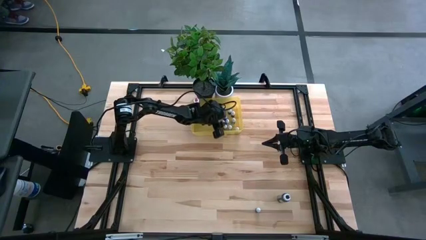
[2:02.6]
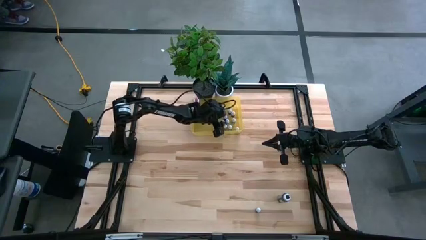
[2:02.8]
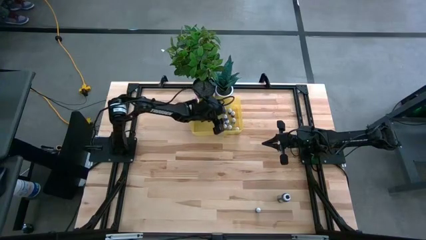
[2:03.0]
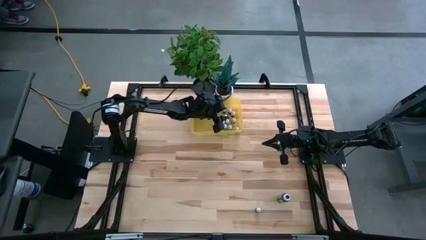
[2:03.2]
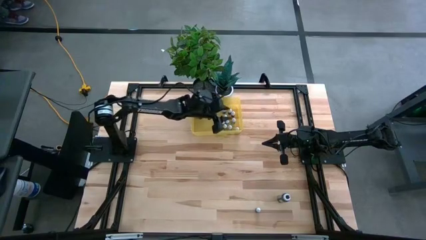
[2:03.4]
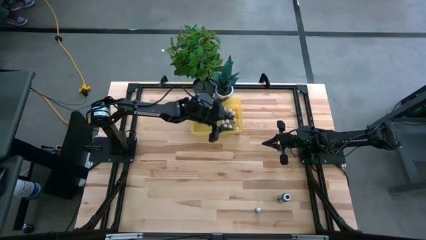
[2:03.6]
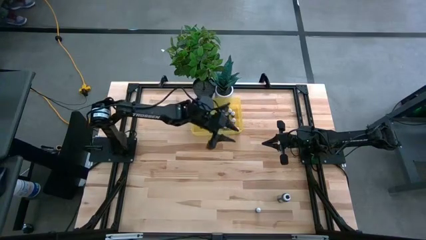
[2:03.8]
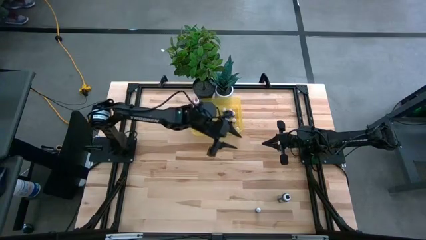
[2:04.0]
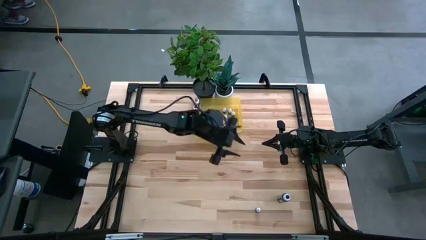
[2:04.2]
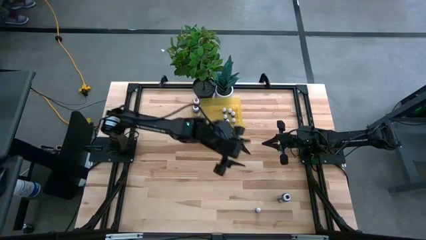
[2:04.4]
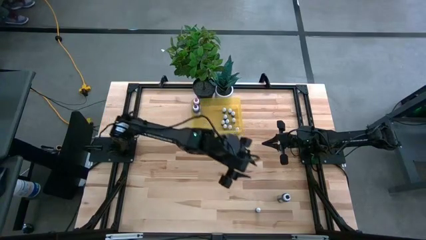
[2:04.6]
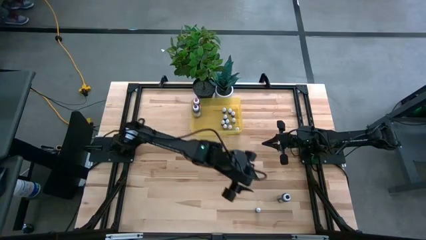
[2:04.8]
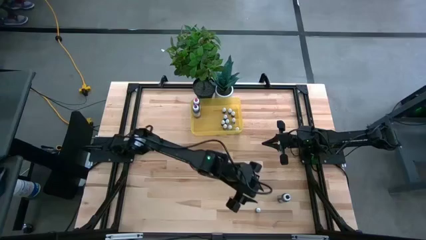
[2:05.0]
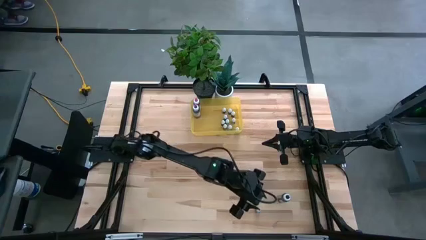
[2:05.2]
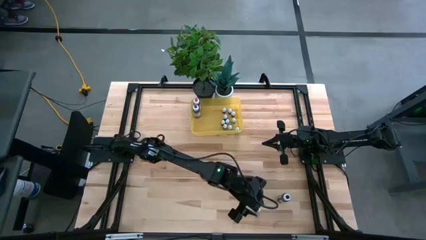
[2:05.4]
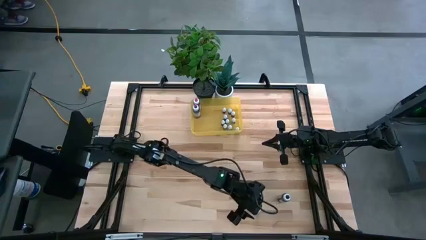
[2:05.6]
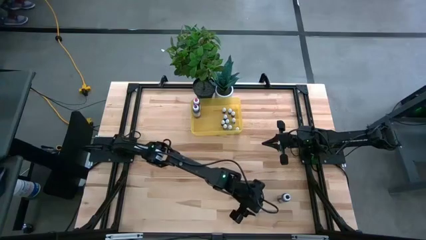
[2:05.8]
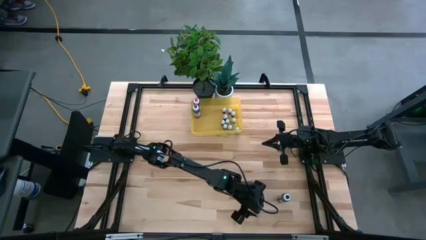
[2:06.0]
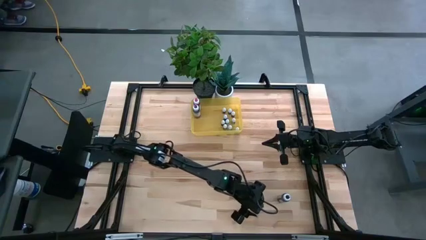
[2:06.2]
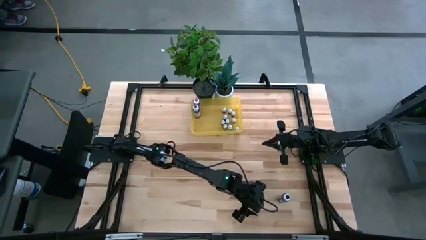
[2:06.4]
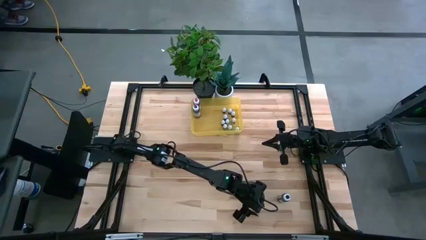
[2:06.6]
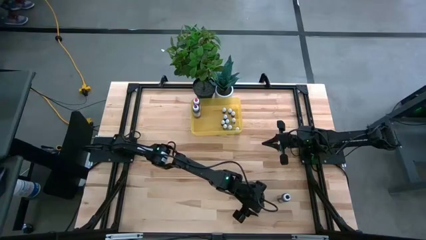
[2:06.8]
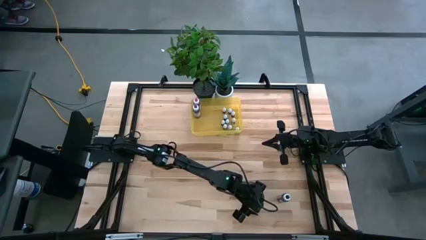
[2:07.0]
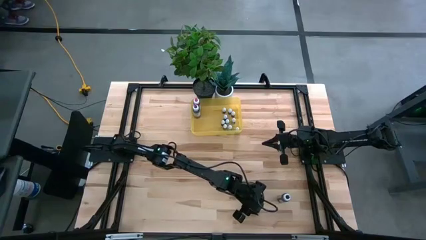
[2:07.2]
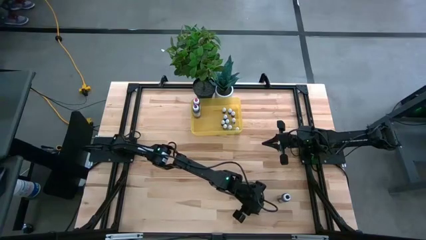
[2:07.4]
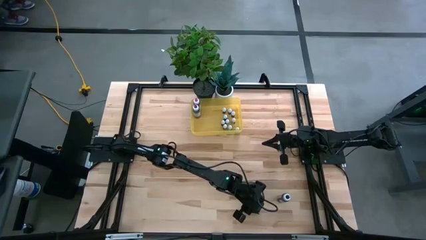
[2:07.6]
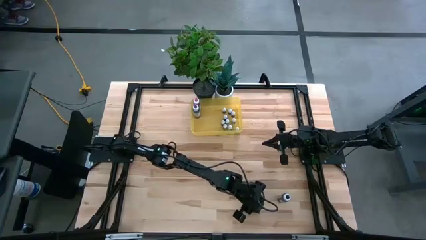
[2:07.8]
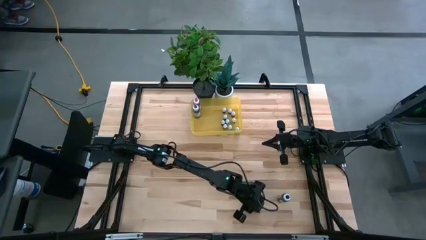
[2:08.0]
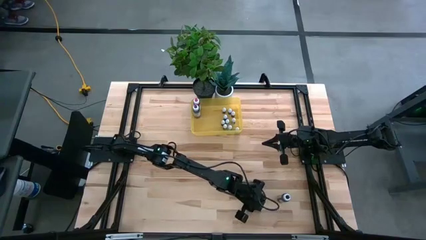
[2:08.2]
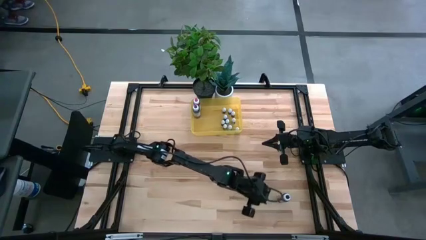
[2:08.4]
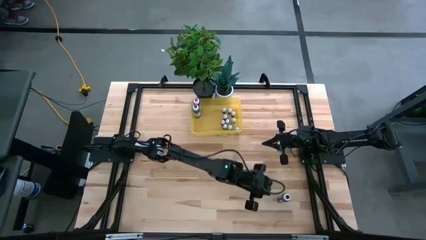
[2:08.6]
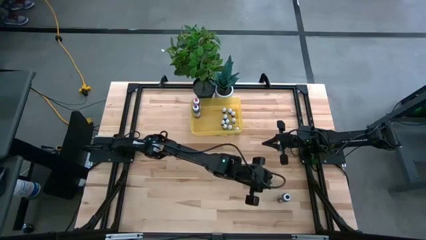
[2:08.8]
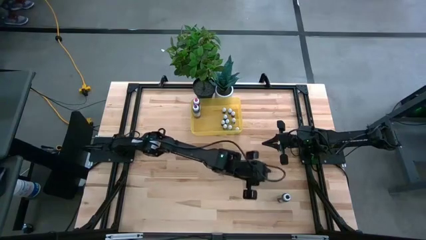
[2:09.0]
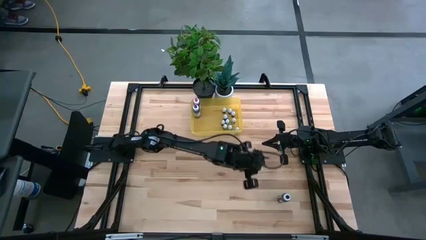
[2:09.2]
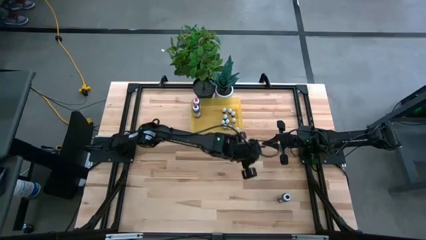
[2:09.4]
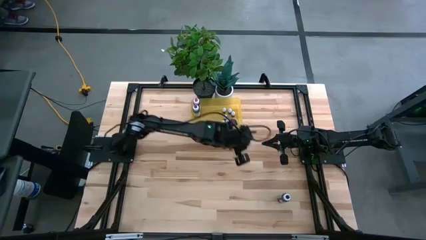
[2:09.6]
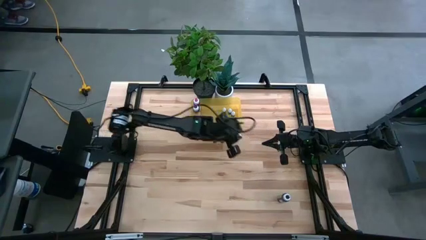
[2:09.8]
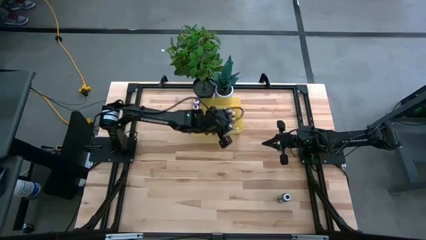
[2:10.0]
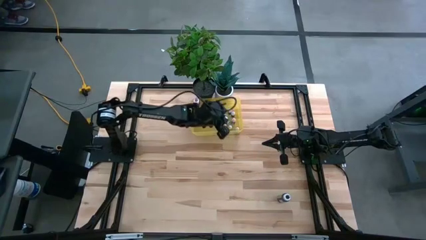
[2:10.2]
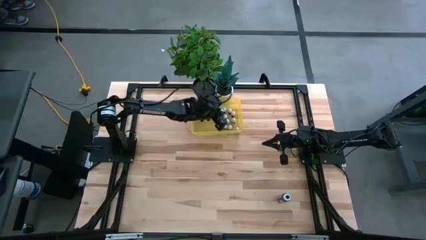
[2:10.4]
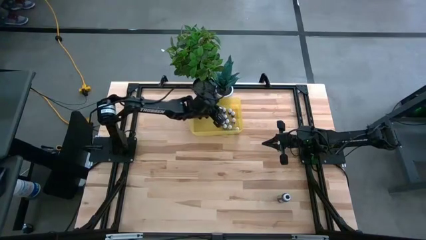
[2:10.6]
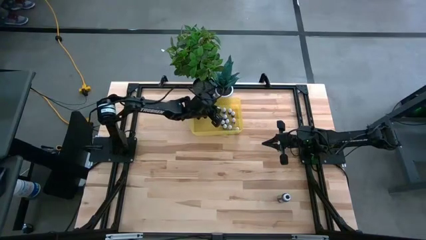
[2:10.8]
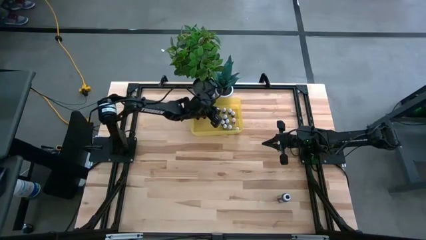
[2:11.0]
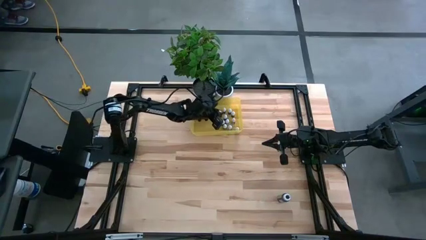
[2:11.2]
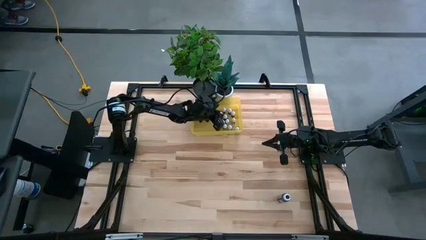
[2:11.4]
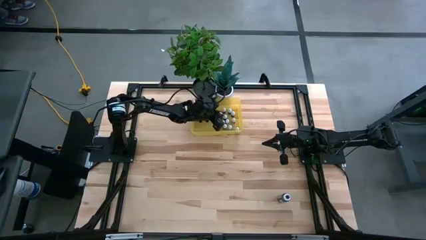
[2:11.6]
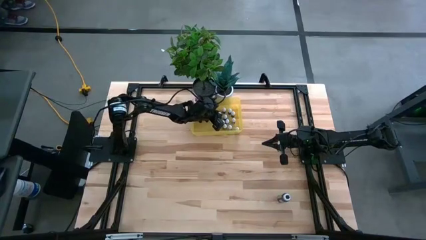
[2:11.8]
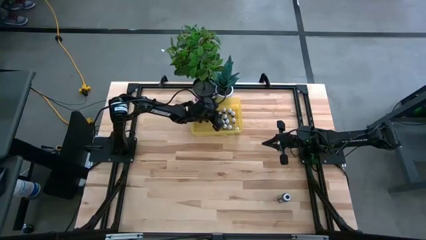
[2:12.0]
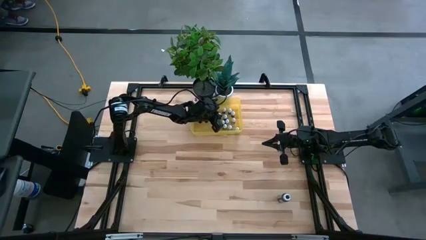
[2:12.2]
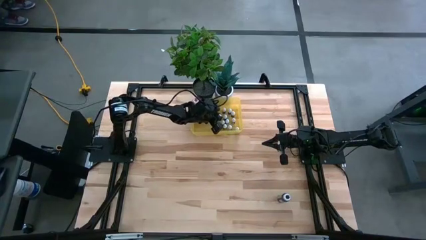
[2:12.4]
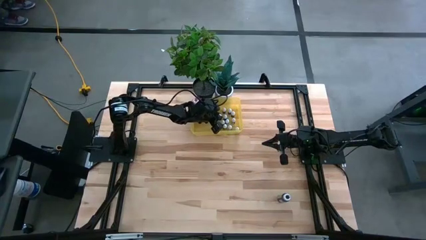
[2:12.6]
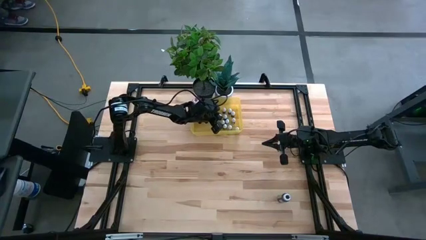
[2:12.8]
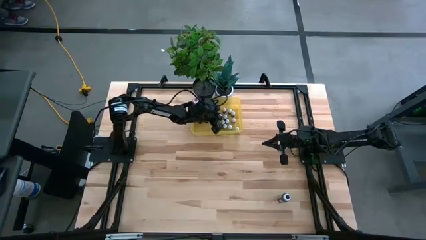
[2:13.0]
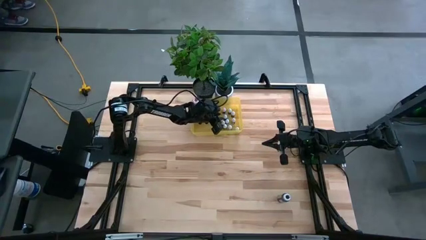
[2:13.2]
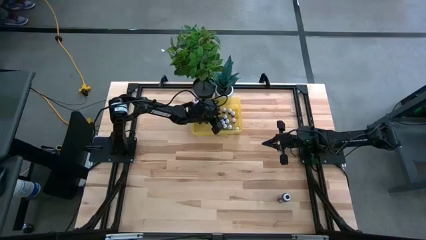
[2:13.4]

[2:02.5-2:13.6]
Task: Pick & Place food coloring
Put the small green food coloring bottle into the yellow bin

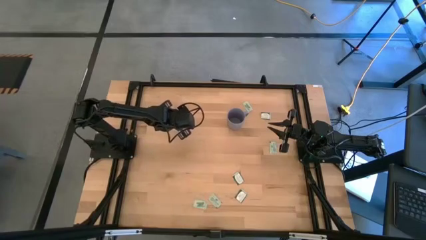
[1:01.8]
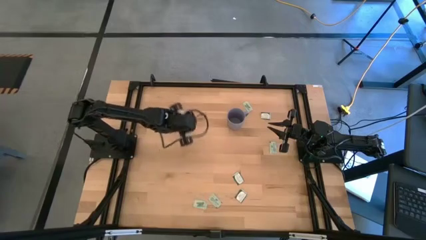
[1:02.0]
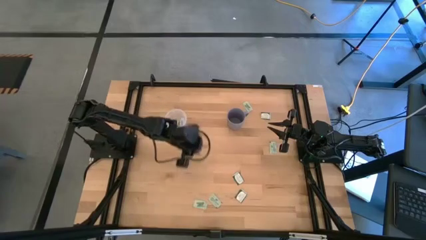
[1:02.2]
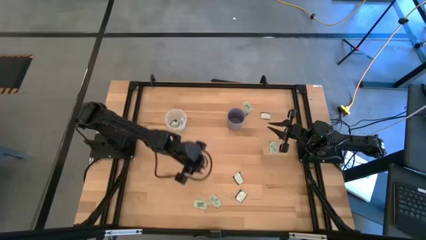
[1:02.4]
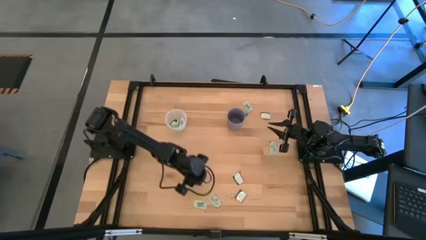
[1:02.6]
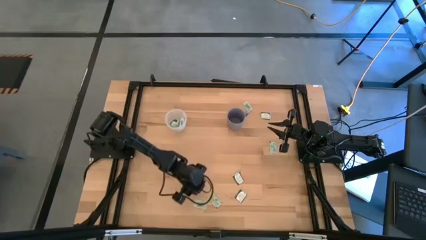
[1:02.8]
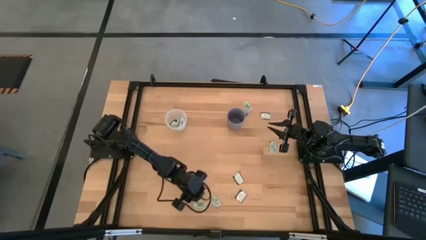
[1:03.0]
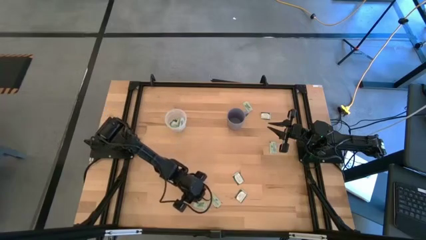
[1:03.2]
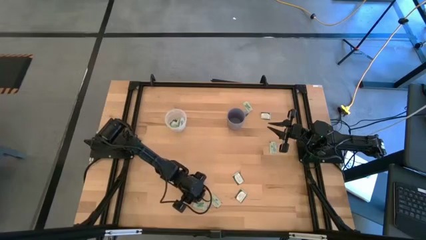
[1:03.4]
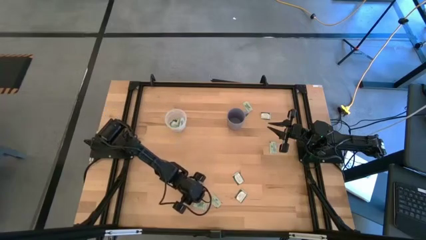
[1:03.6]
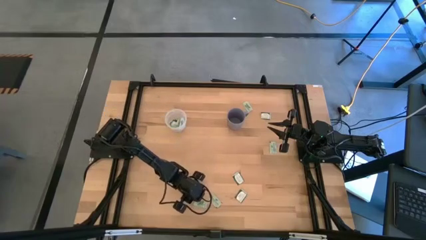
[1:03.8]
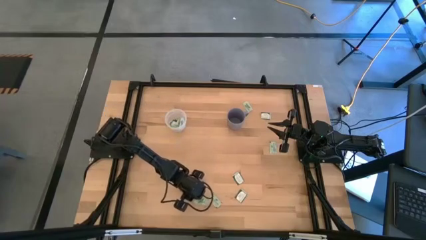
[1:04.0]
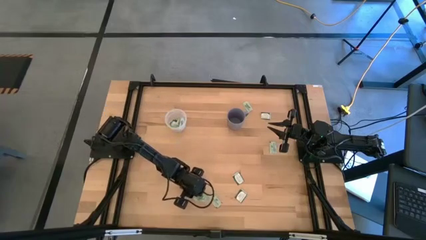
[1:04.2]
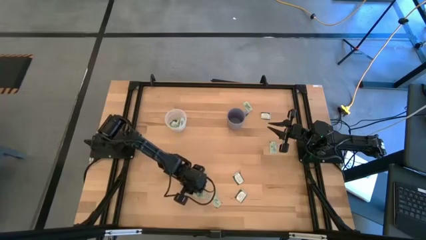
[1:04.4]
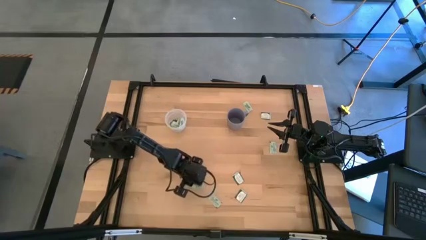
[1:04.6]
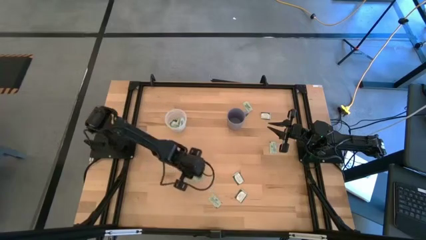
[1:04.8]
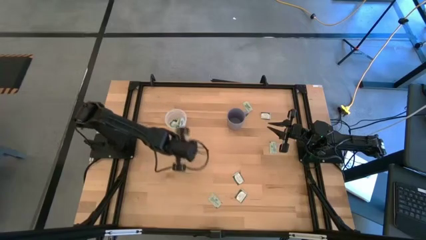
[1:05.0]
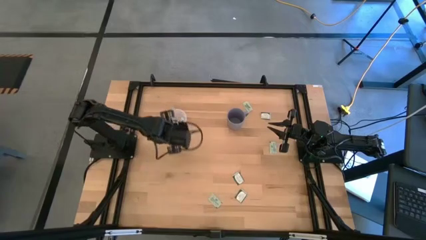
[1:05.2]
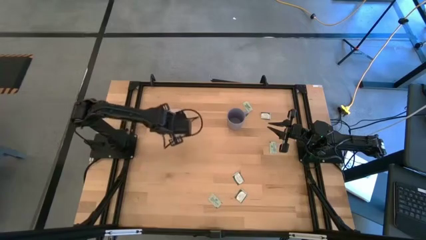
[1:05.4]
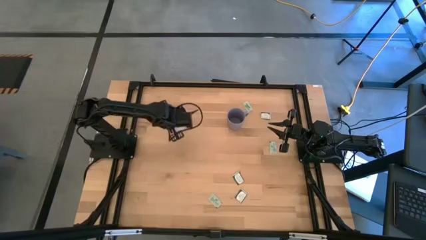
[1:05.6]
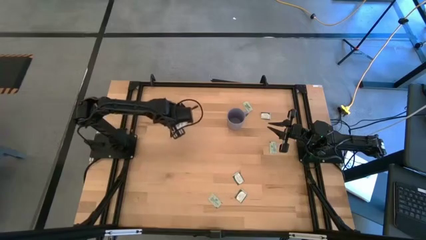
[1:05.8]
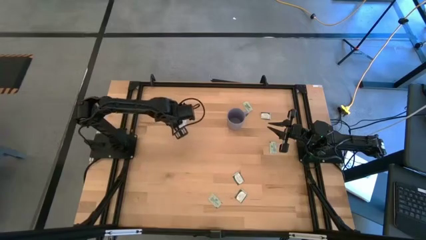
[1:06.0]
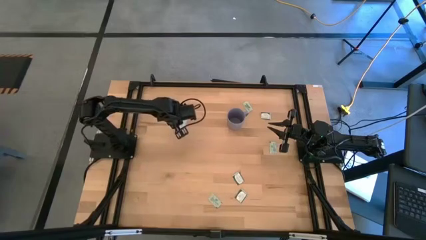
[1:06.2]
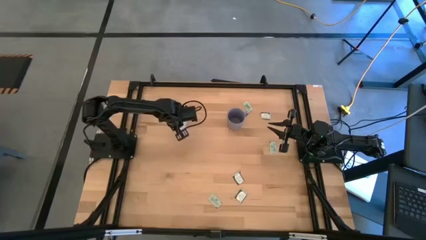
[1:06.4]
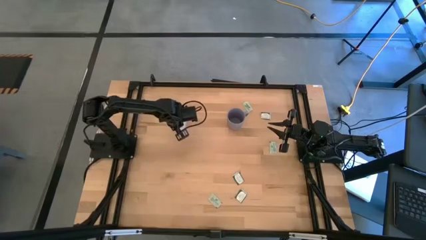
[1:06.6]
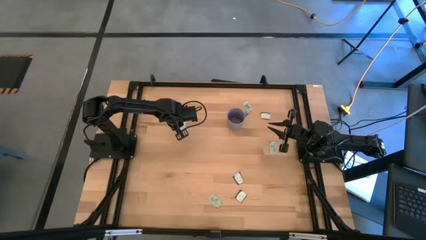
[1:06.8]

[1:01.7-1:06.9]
Task: Pick and place Stevia / Truvia into bins
Put the light green stevia packet into the transparent container

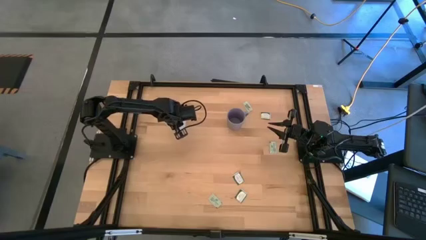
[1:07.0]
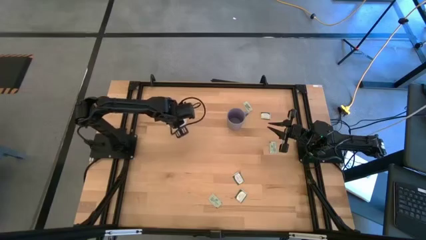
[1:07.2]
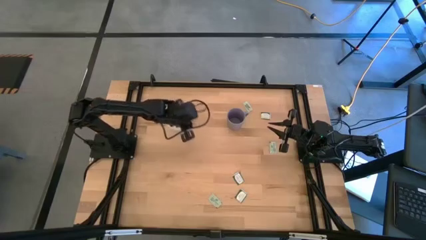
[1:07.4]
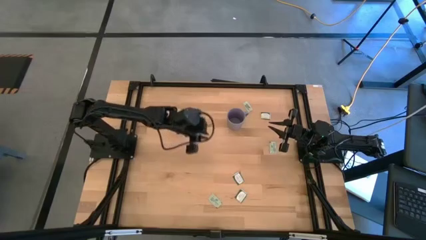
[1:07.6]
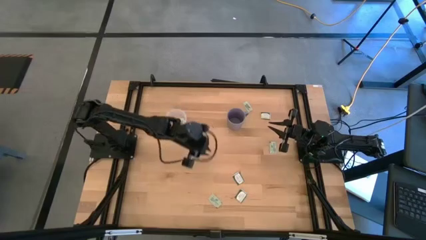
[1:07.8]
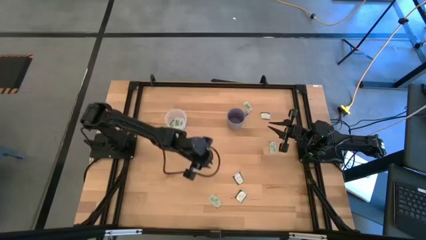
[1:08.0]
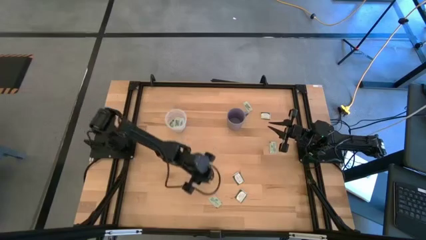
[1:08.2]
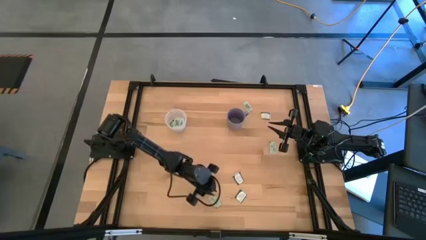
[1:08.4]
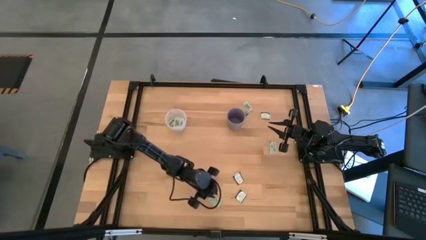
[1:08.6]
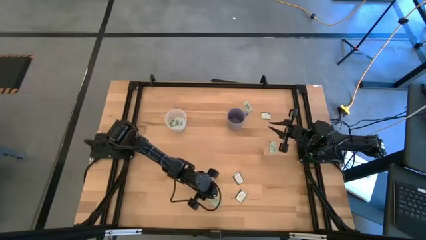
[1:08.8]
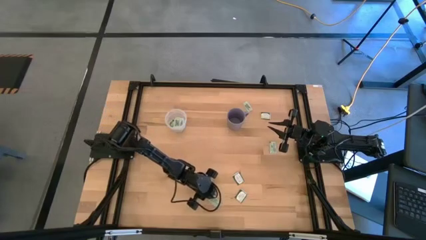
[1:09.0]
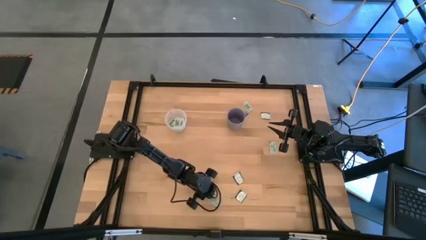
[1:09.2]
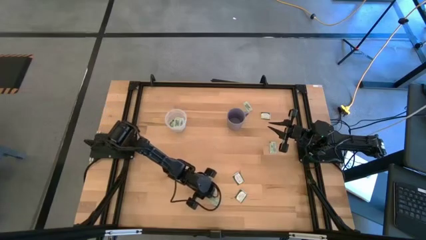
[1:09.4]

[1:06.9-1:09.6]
Put the light green stevia packet into the transparent container
